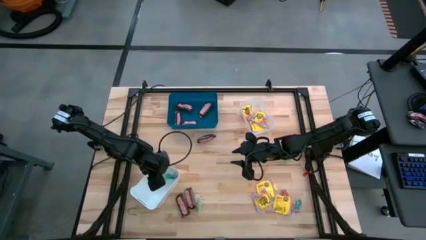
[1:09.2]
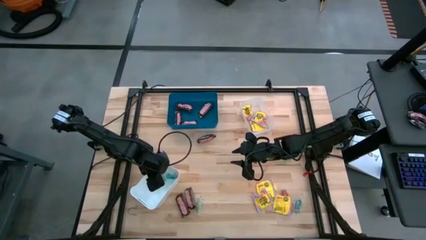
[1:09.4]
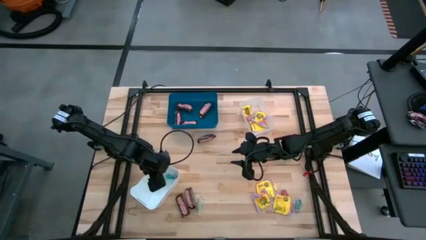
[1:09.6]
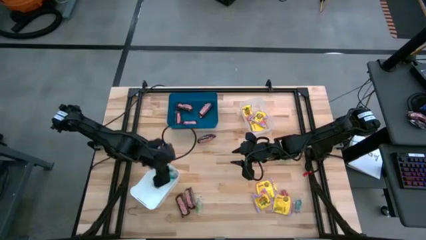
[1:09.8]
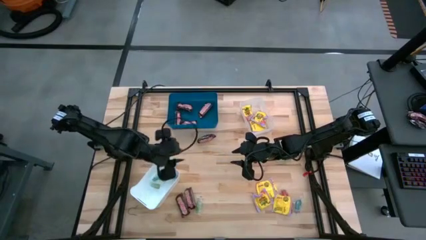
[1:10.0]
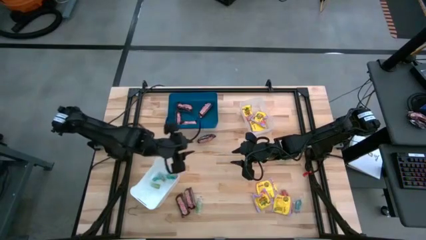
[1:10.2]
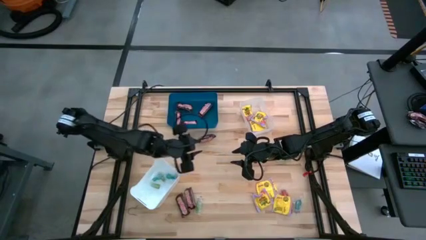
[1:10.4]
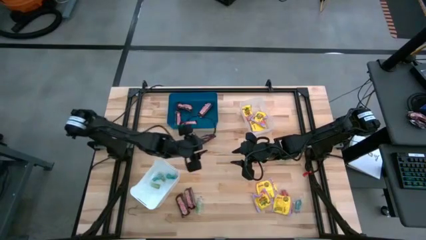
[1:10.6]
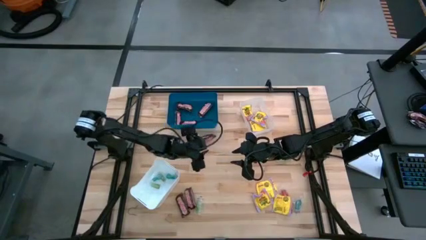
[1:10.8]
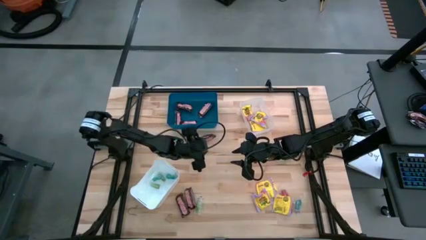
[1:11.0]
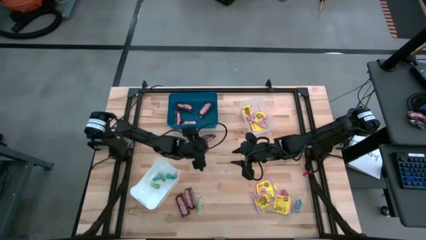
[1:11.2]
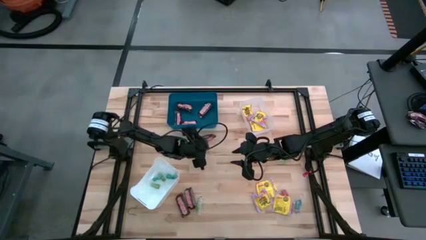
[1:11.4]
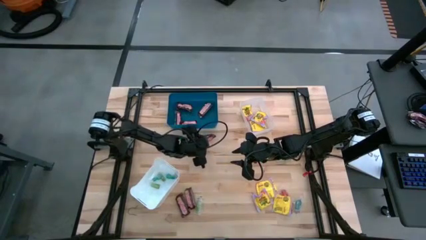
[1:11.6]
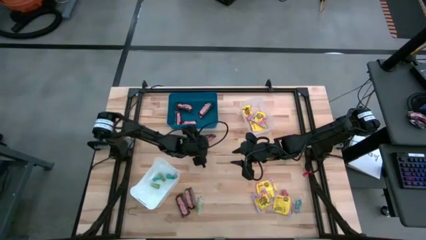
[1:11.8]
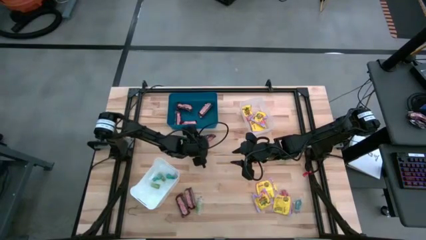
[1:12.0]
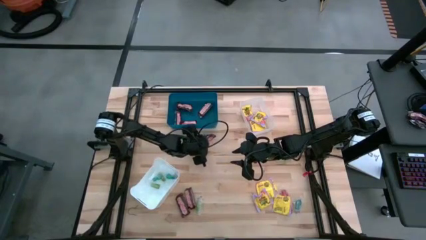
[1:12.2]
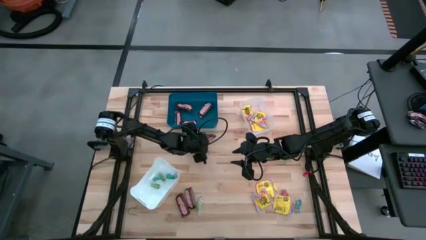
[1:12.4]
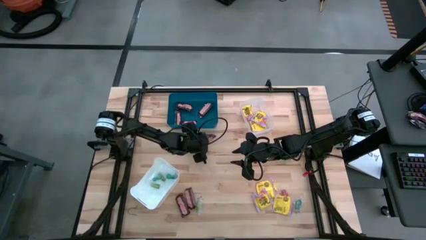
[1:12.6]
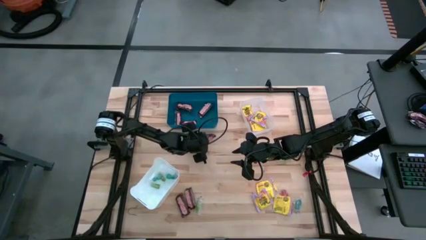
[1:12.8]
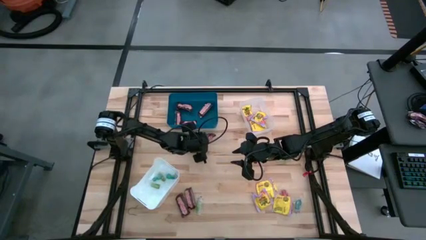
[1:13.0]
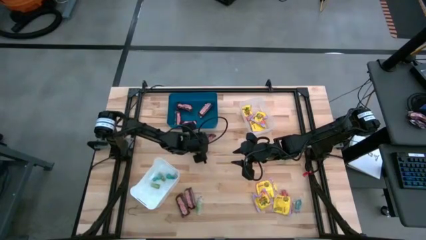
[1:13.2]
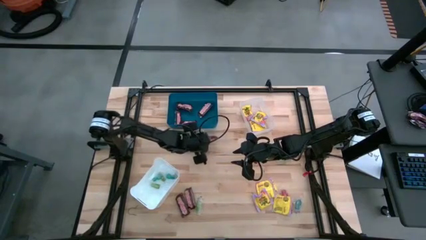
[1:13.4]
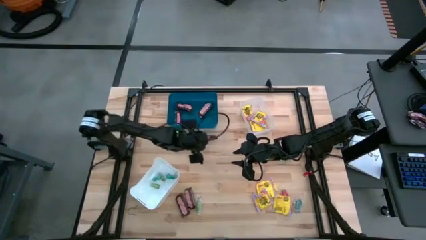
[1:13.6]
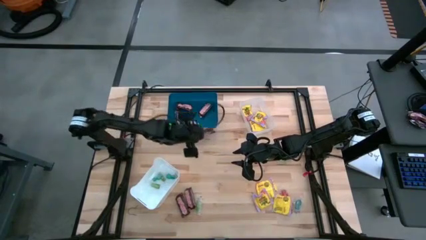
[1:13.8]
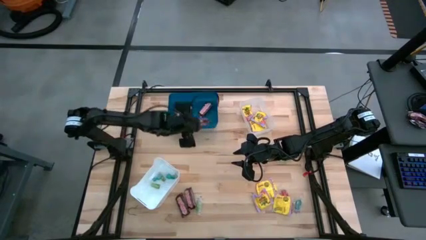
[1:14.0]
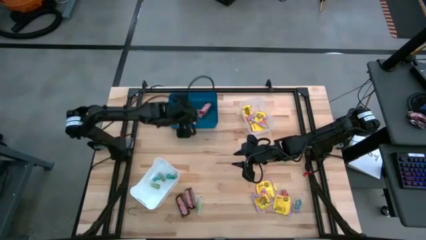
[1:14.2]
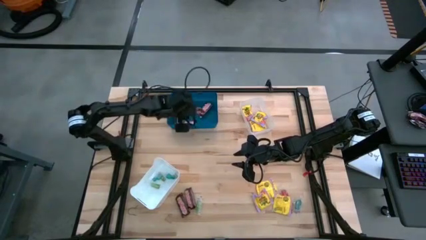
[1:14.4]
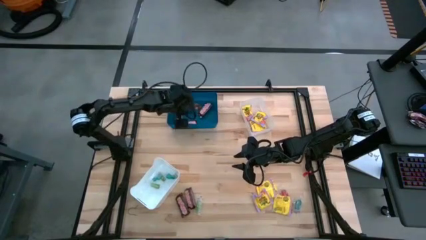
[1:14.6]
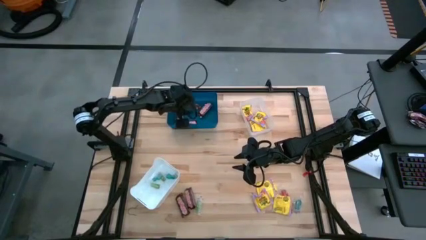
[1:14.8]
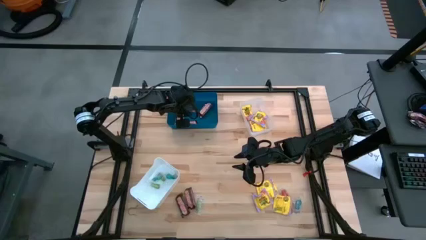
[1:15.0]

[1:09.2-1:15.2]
Task: Sort candy
Put the brown chocolate into the blue bin

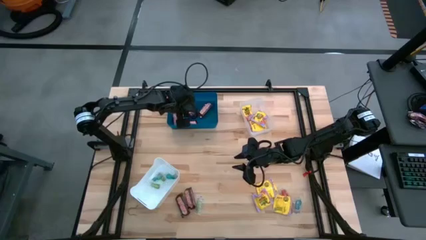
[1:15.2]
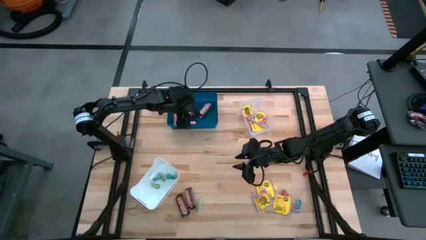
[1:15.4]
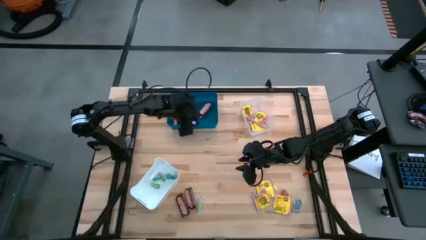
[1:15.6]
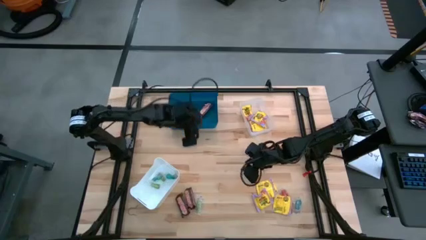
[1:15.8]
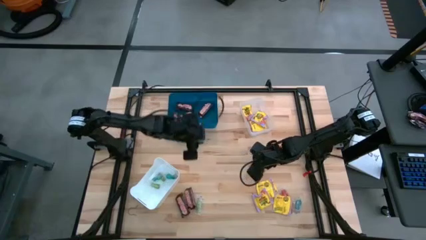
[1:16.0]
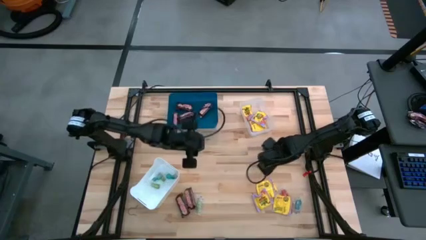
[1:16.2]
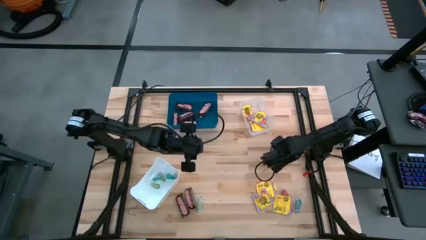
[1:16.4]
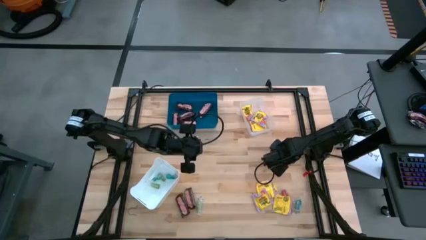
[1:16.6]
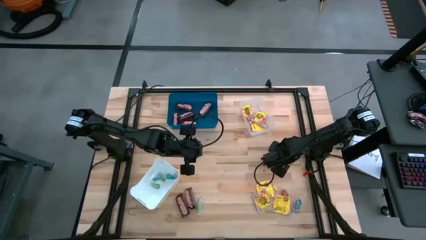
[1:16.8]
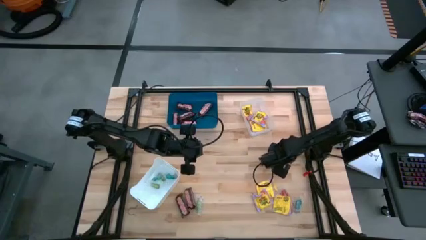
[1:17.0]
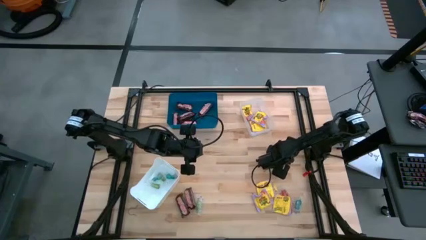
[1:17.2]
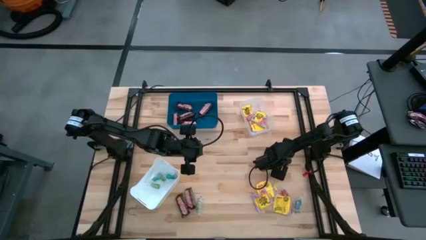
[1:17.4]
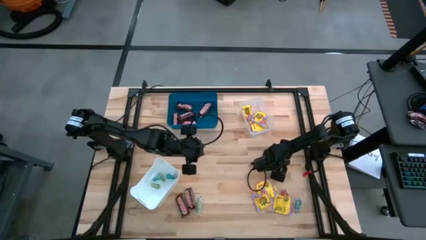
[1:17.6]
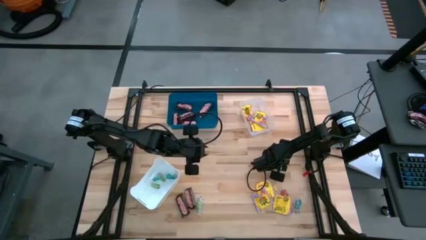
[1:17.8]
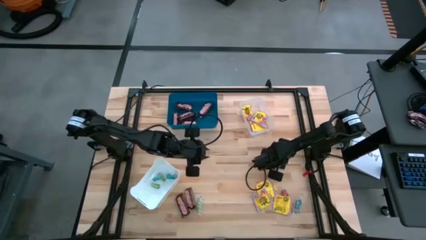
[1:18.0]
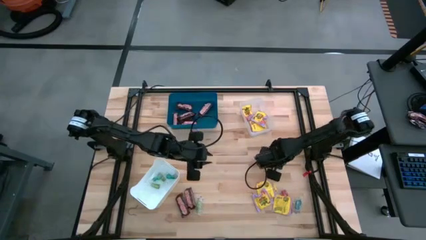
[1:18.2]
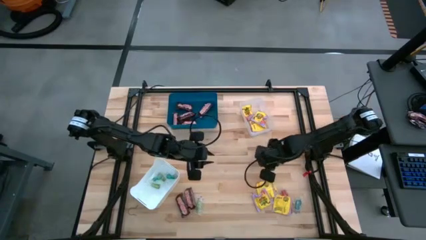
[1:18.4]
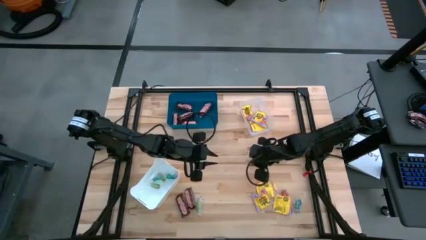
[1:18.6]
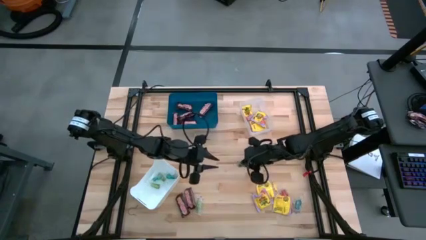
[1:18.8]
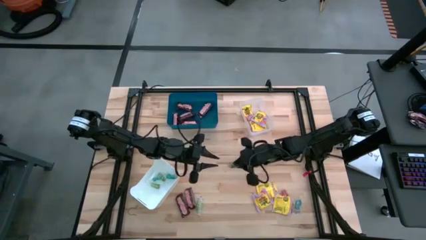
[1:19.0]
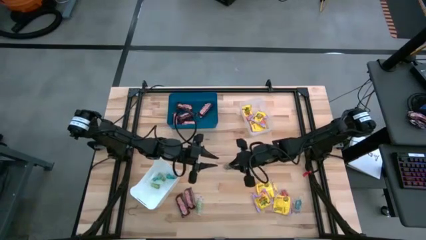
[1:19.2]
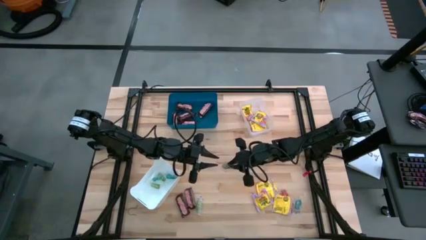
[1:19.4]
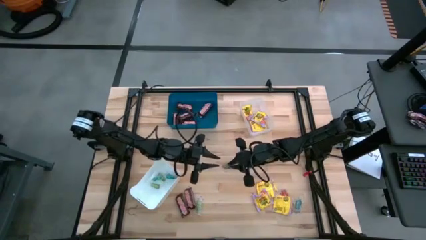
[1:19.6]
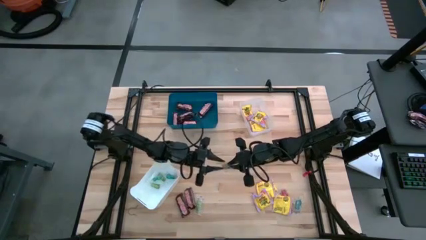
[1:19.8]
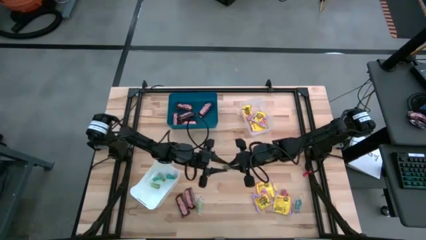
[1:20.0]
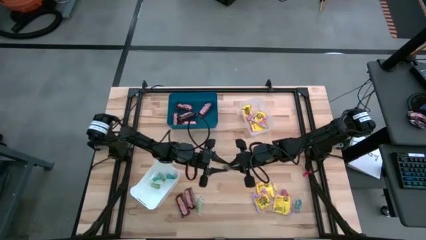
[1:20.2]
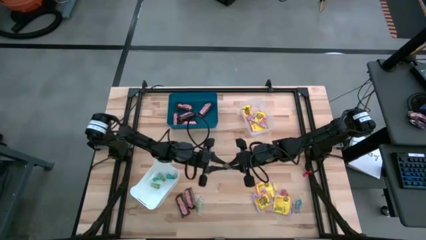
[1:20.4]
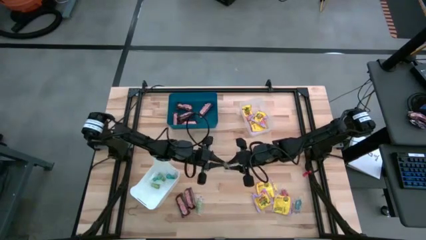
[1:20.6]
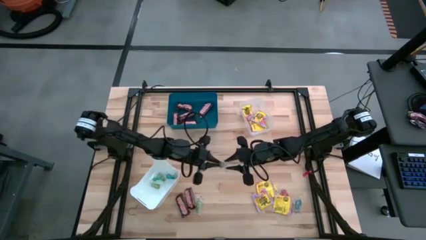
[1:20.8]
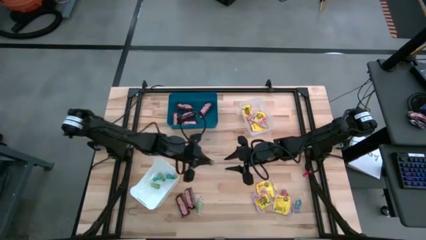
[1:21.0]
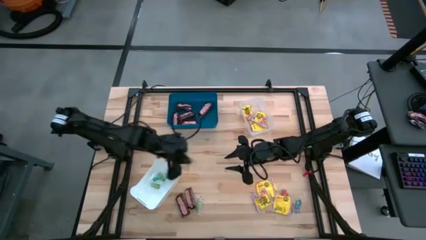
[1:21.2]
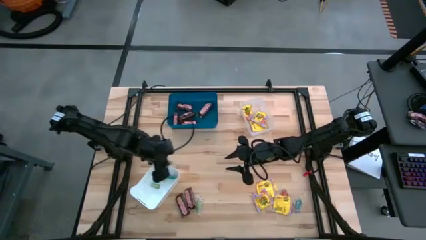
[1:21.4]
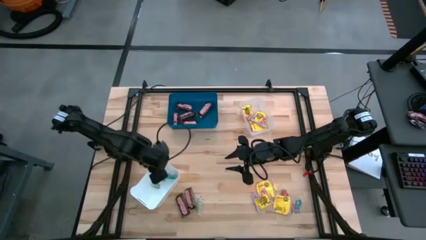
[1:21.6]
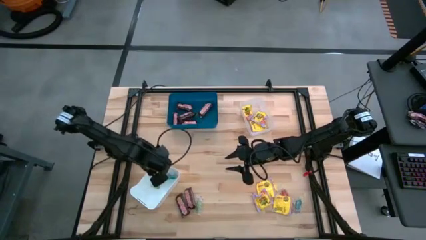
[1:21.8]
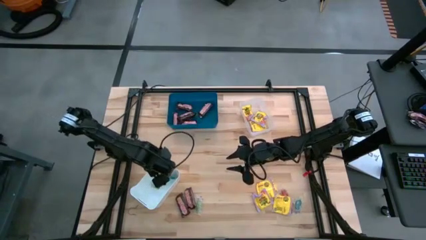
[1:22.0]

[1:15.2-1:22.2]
Put the green gummy into the white bin

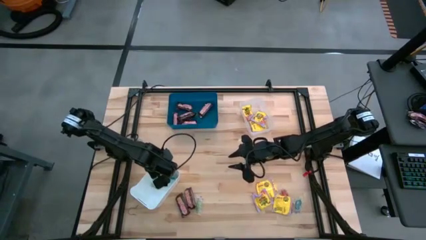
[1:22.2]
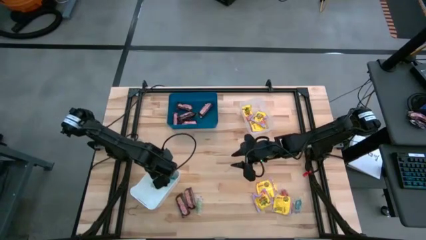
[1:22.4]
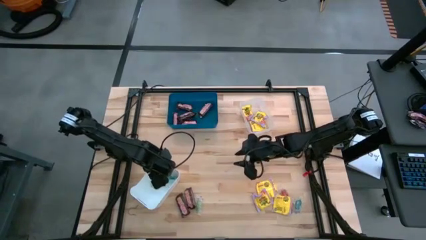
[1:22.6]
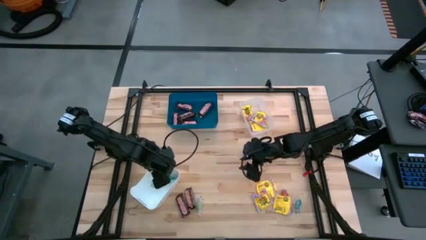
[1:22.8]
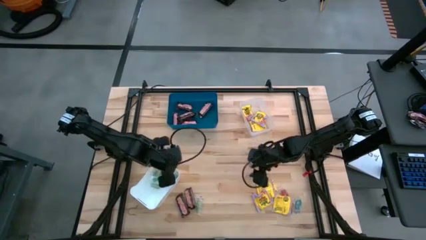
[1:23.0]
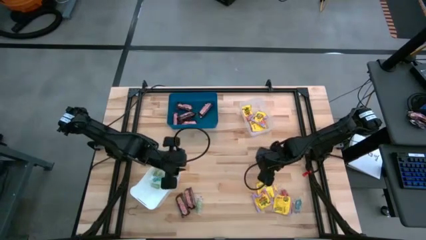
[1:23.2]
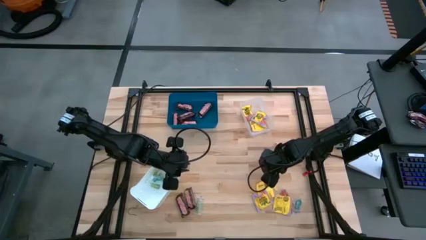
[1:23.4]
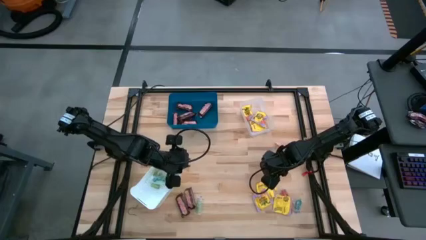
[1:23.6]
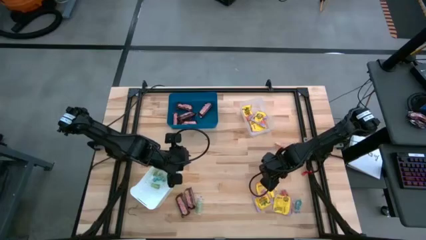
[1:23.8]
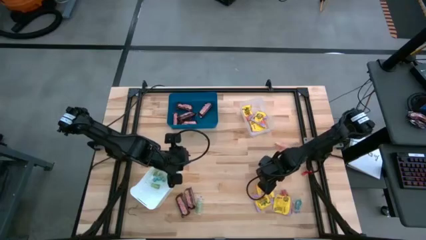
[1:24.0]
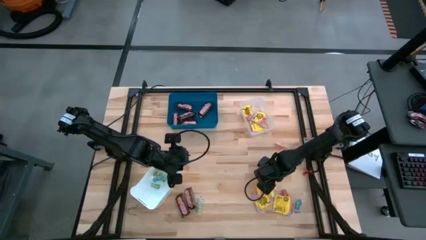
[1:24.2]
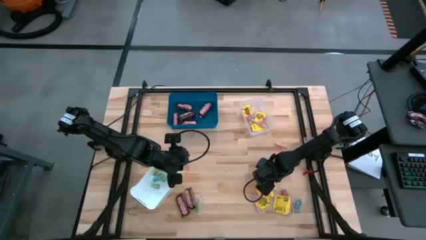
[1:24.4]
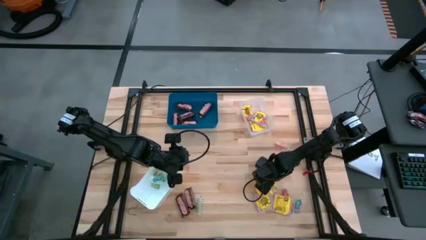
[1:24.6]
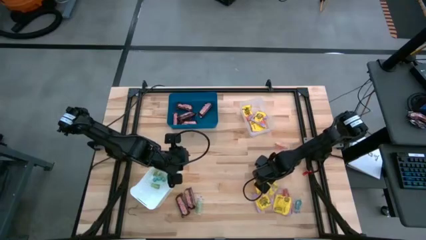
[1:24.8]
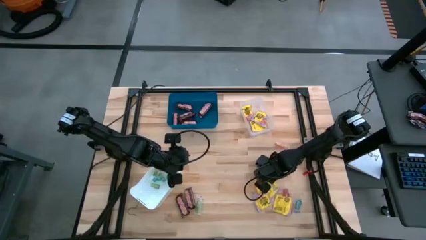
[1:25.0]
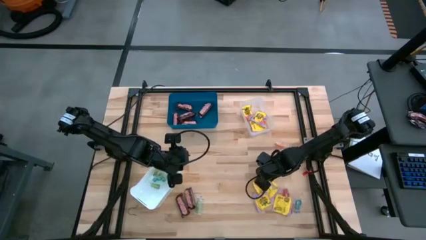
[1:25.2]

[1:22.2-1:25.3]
Put the yellow candy into the transparent bin
